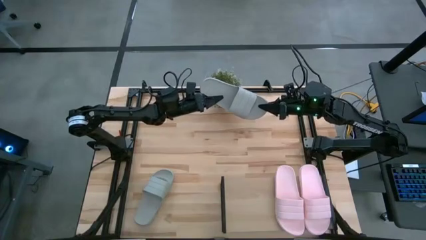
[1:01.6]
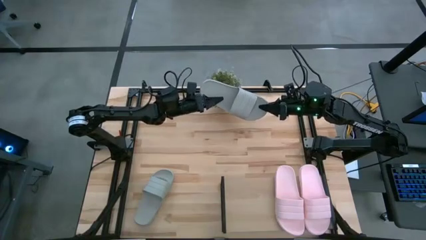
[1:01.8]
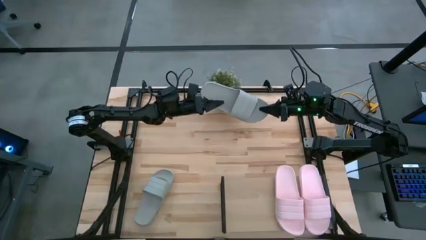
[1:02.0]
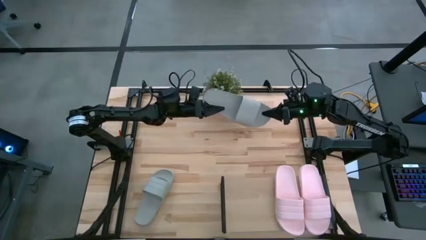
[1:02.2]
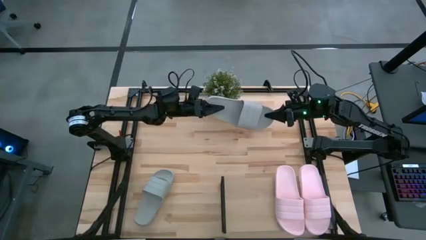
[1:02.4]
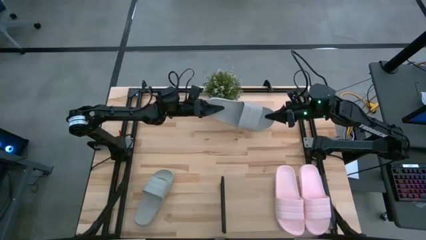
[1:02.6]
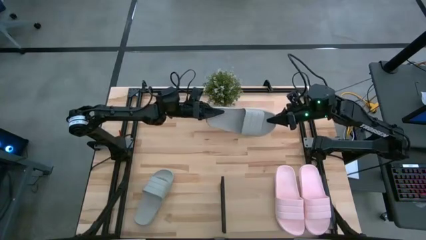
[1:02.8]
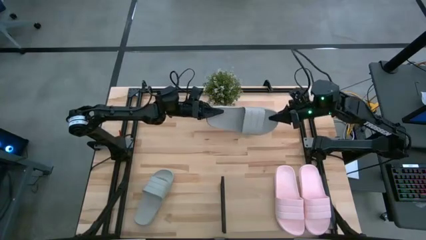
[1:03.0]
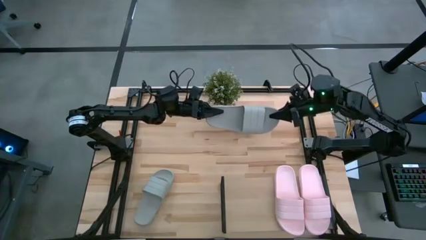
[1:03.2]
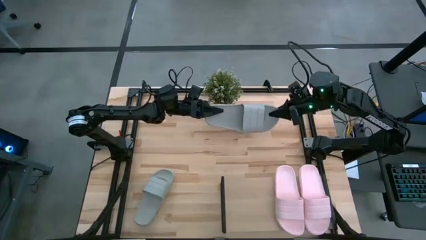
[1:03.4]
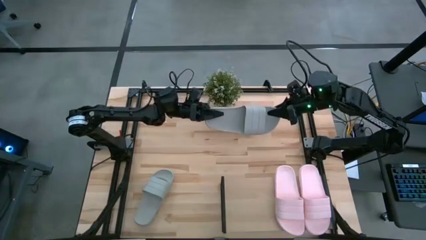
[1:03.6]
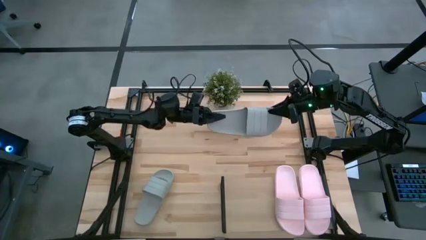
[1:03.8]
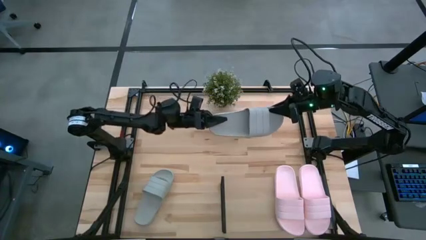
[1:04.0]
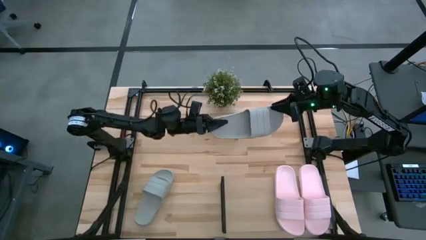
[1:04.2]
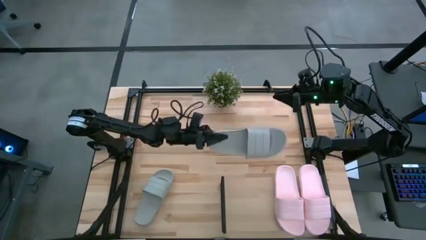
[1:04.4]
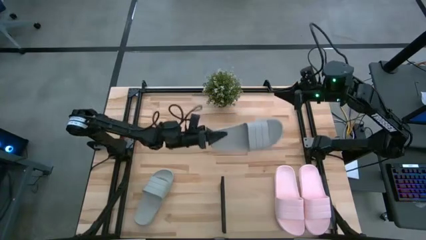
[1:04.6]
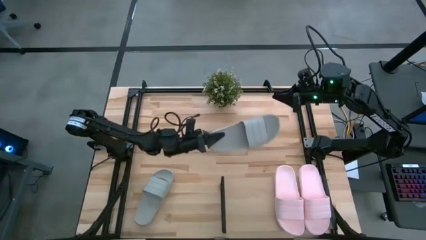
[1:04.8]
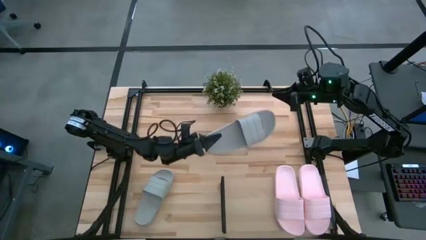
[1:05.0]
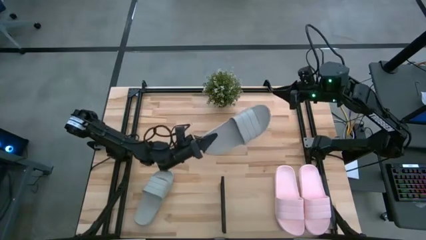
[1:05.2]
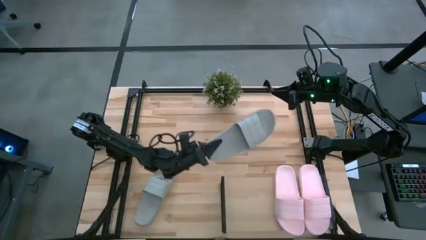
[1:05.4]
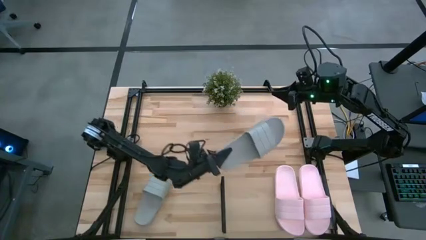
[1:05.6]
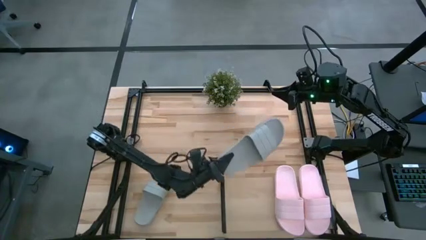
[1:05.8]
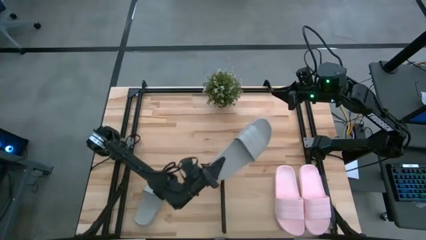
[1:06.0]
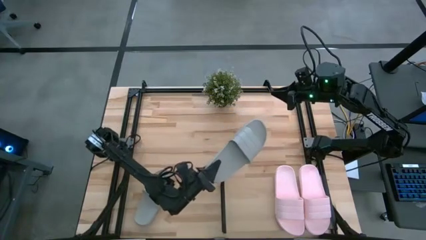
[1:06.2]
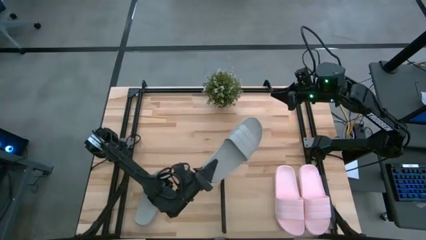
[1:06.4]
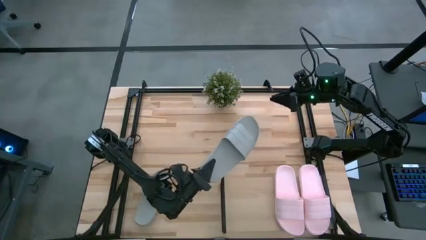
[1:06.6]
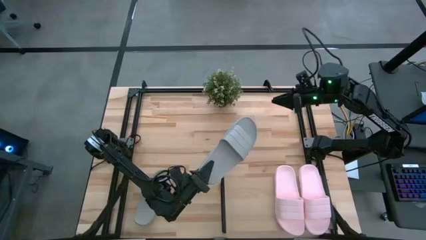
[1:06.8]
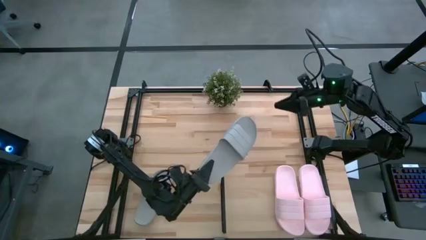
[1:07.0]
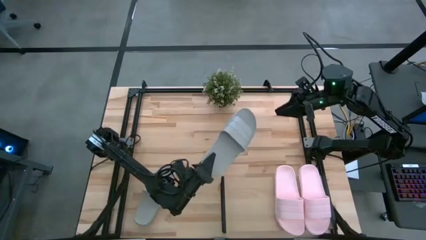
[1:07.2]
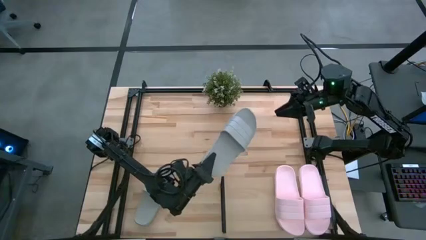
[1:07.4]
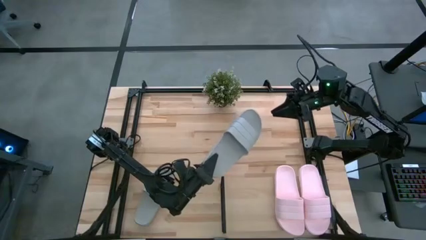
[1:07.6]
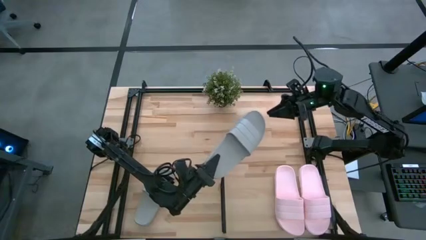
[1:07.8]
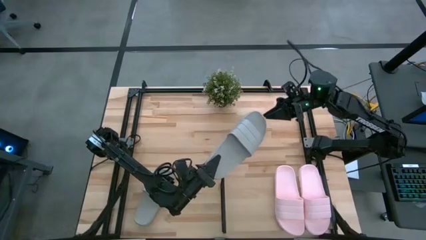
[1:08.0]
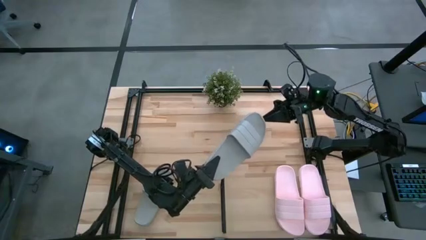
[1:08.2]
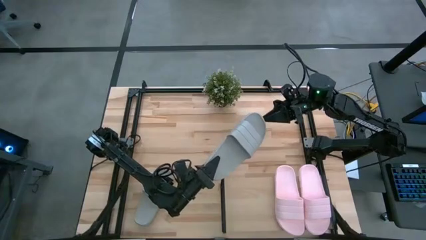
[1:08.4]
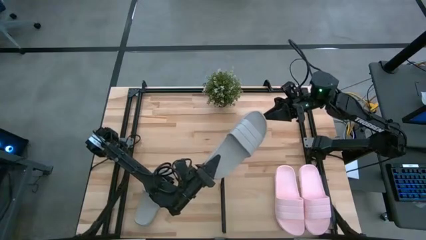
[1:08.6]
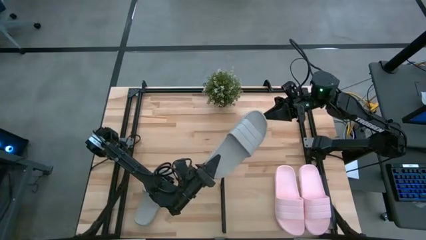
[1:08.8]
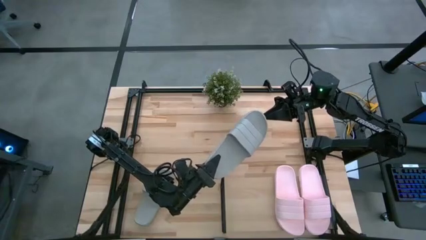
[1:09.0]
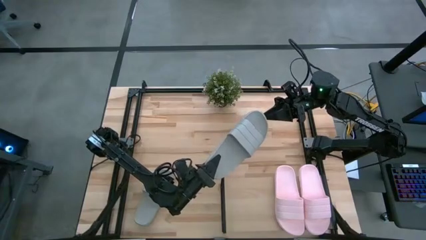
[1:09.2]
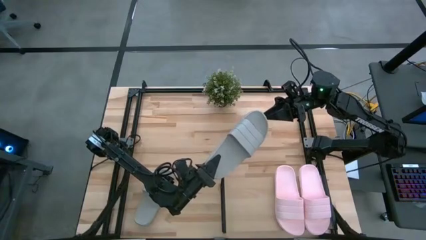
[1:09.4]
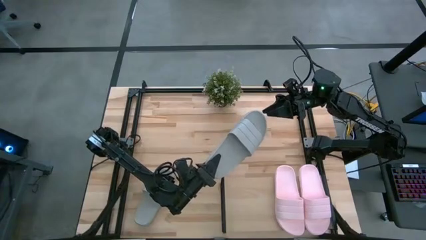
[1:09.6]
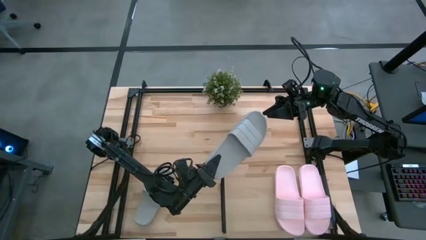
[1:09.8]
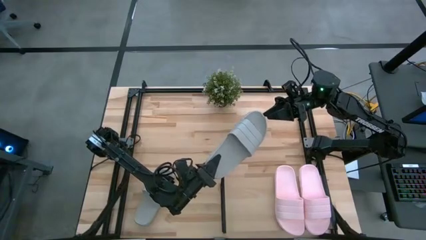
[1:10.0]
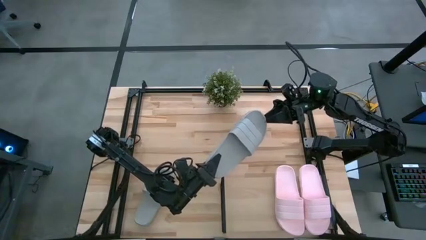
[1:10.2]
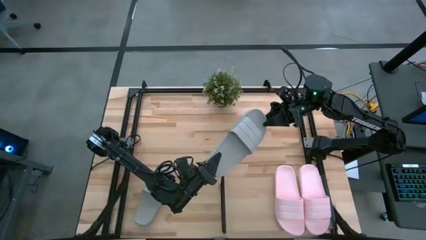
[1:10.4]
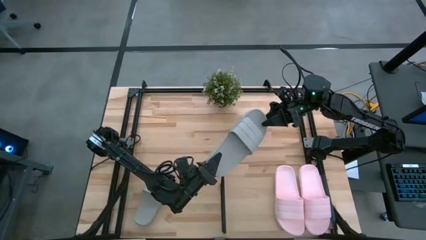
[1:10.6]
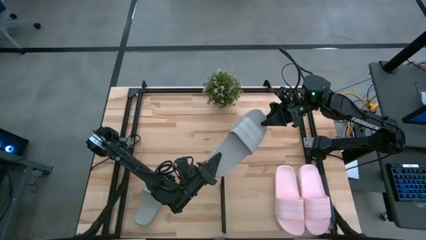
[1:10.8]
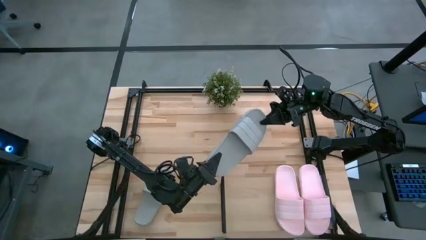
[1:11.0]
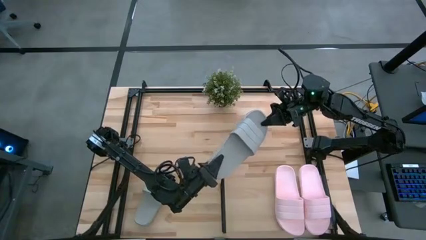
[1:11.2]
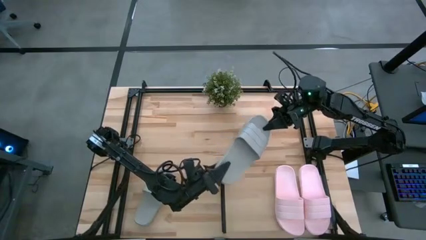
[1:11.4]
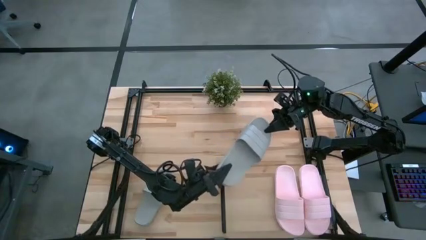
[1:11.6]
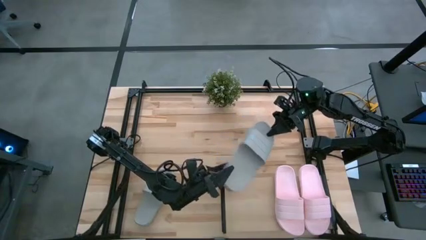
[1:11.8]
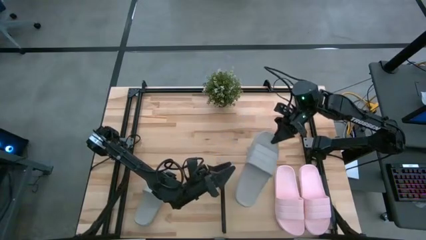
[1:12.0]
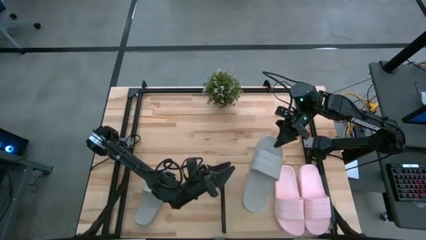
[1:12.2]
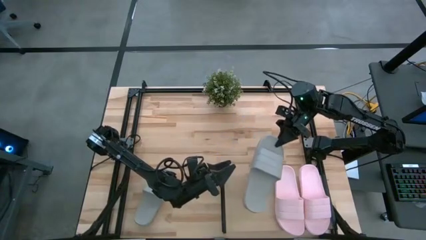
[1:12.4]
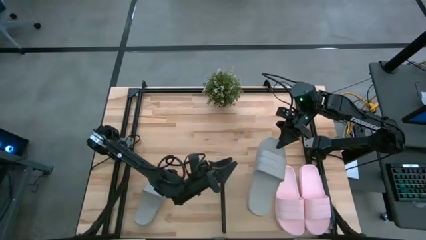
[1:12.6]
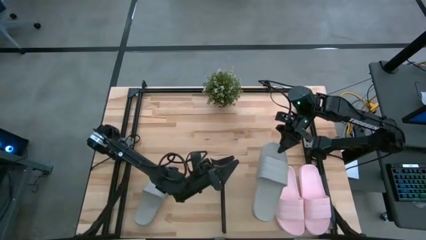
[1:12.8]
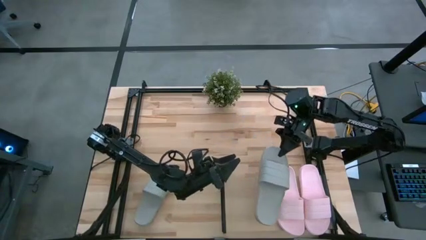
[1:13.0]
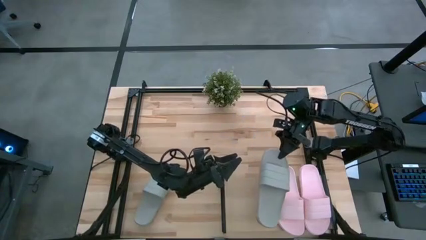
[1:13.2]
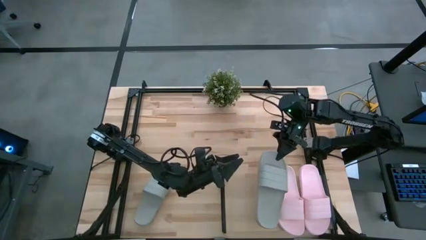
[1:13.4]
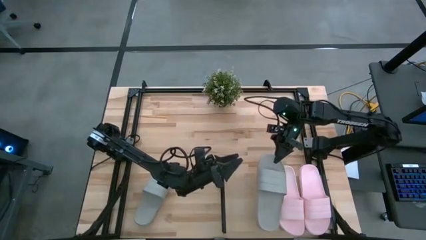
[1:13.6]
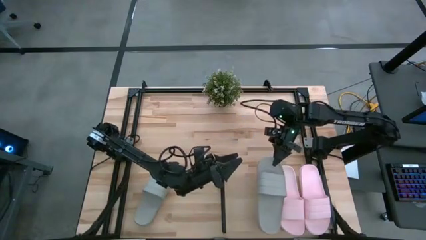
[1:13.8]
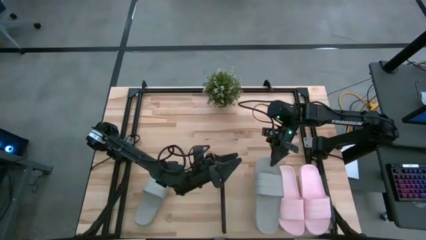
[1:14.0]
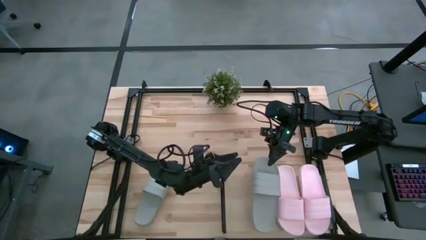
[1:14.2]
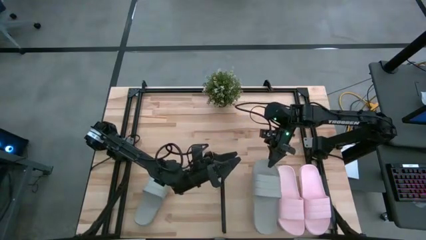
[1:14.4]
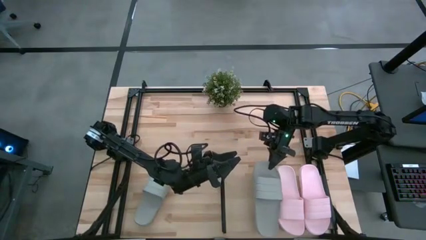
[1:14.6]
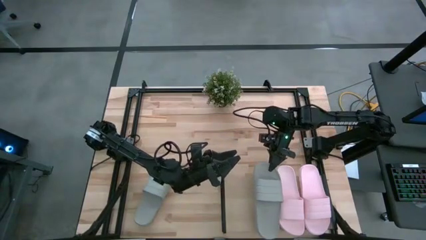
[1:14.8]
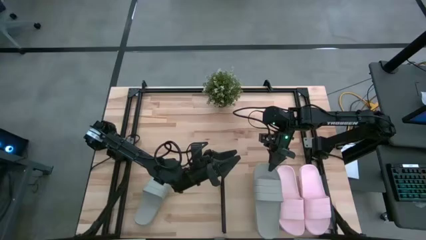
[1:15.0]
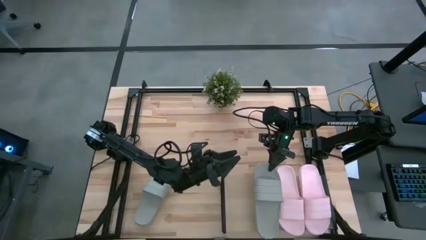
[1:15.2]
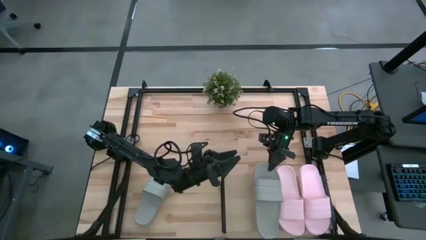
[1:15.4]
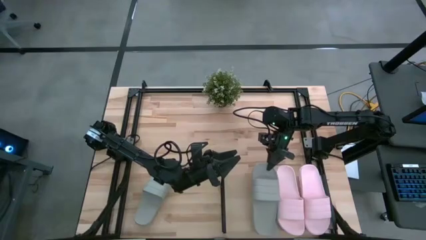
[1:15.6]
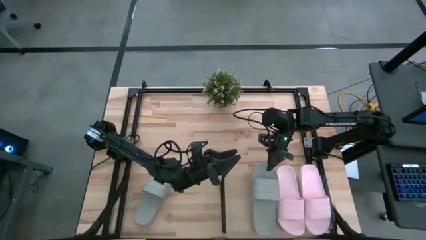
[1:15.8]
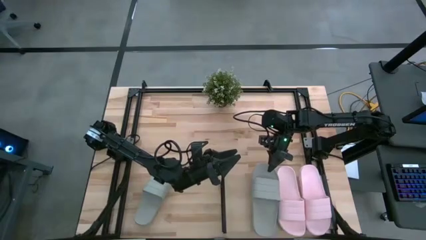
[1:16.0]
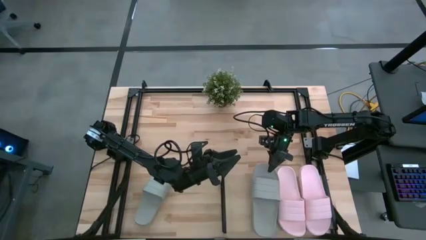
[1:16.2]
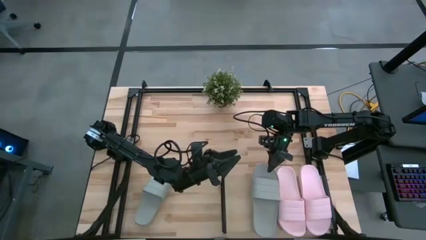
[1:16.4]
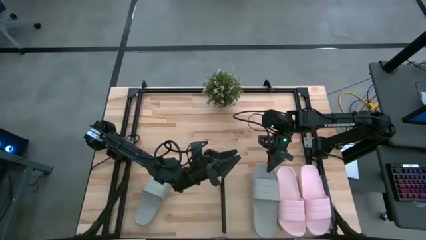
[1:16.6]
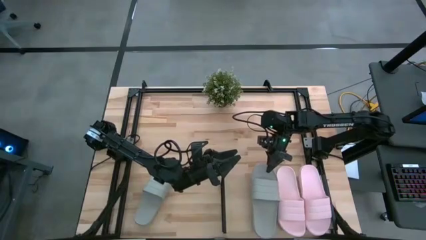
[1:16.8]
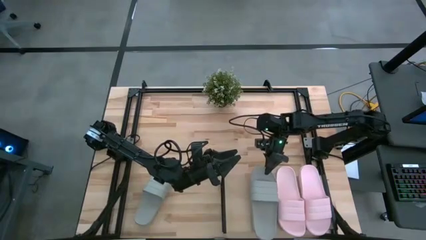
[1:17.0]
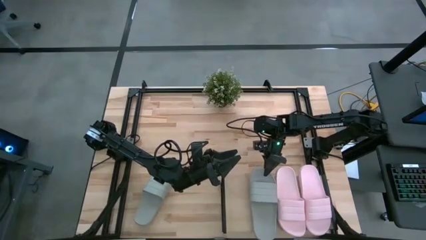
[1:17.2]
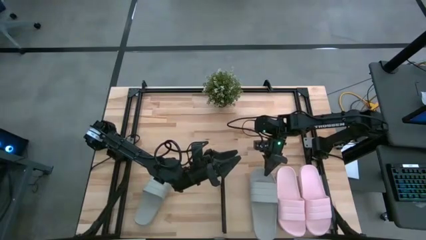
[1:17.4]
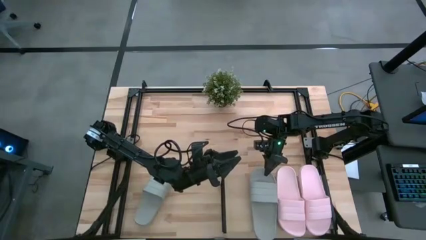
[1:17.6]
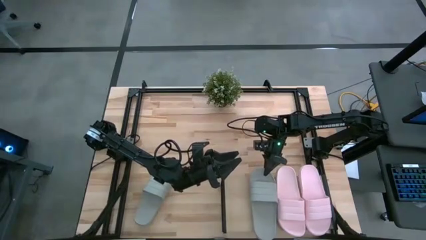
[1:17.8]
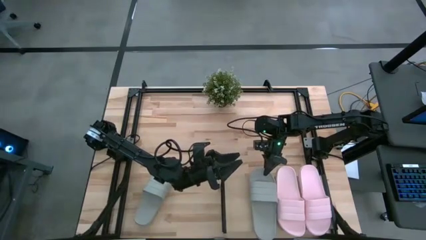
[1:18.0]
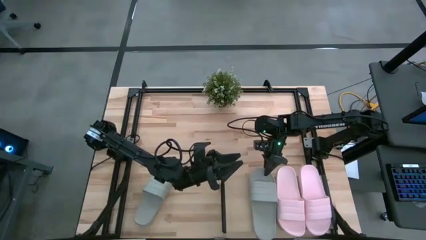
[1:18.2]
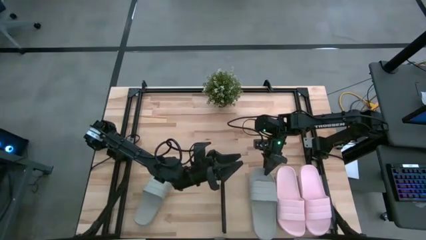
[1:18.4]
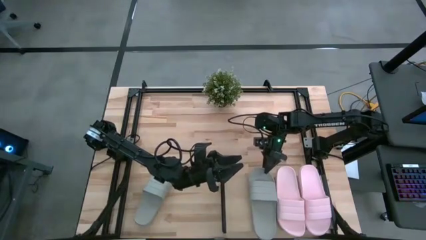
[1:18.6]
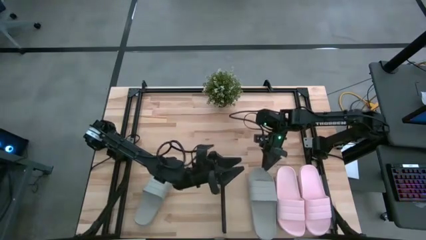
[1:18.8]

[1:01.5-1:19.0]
Task: Pick and place slides into the shelf
Put the top gray slide on the shelf
